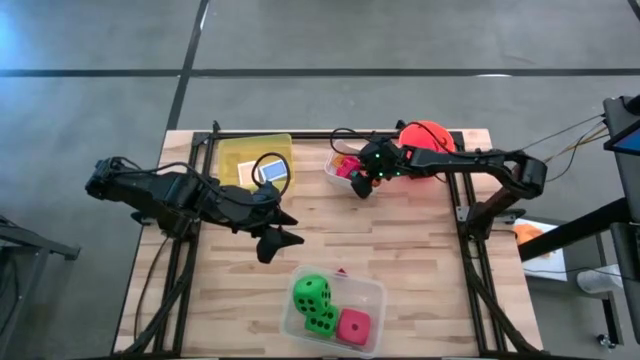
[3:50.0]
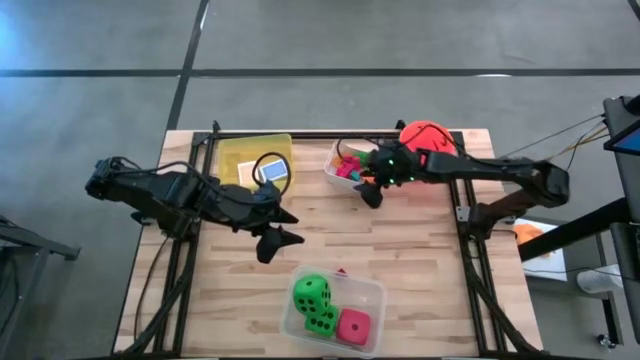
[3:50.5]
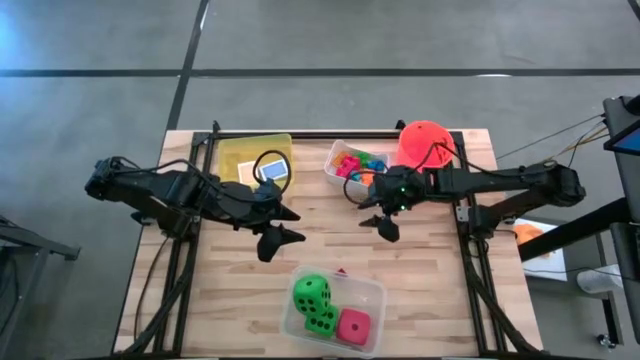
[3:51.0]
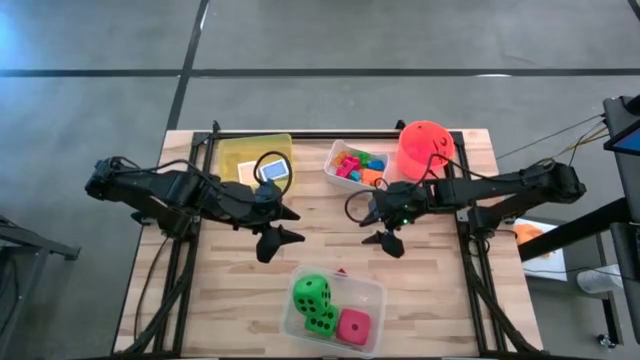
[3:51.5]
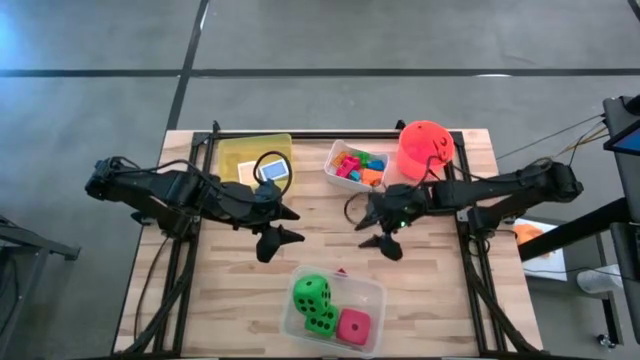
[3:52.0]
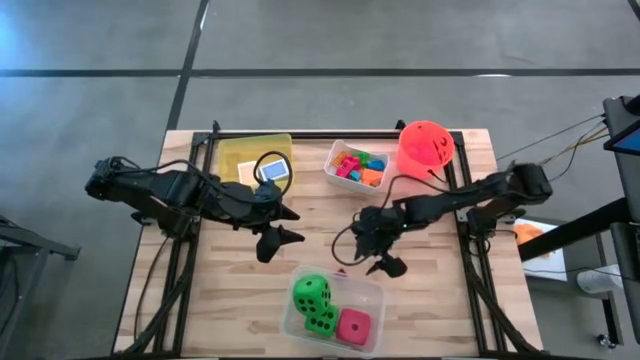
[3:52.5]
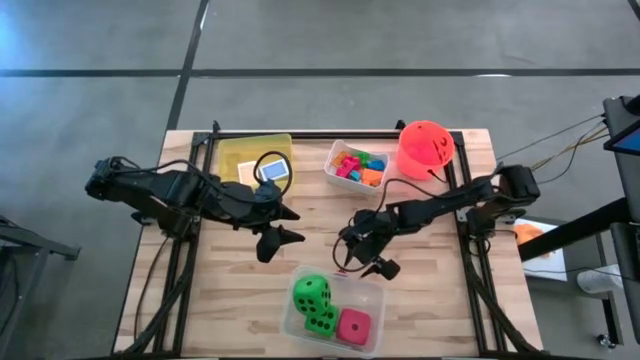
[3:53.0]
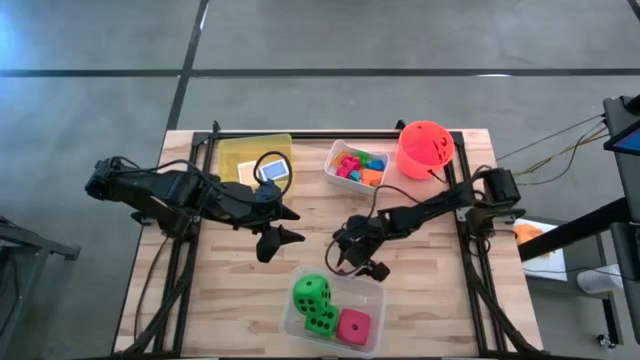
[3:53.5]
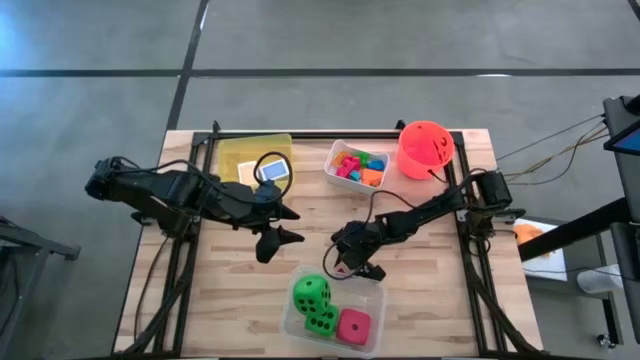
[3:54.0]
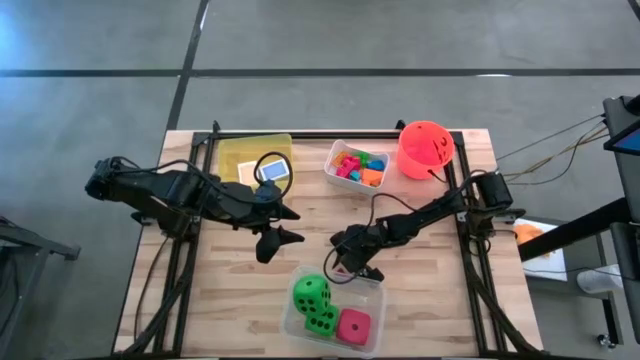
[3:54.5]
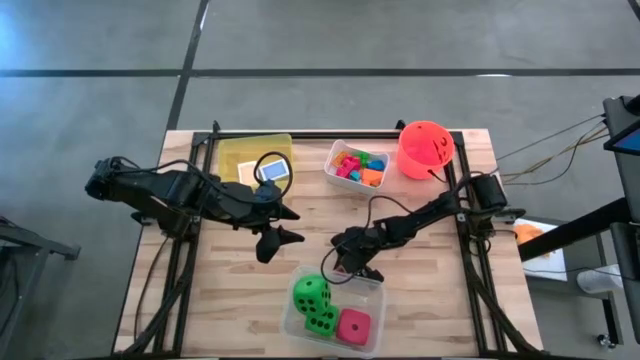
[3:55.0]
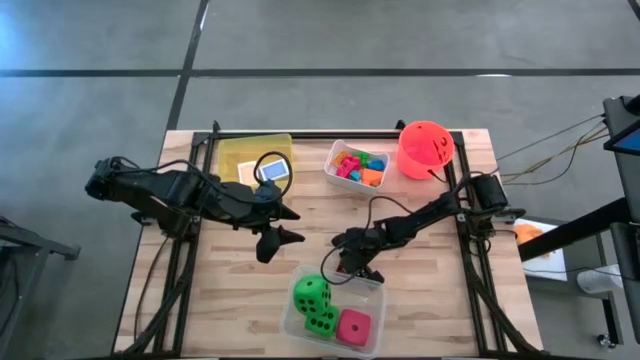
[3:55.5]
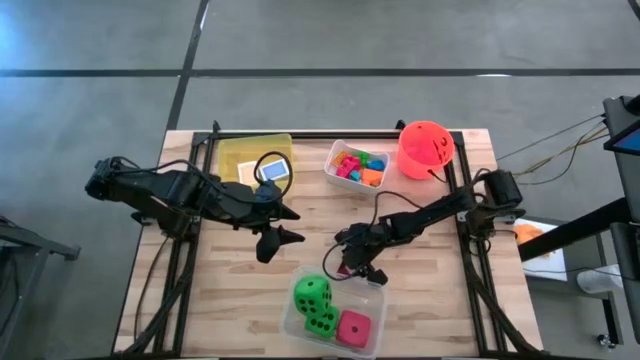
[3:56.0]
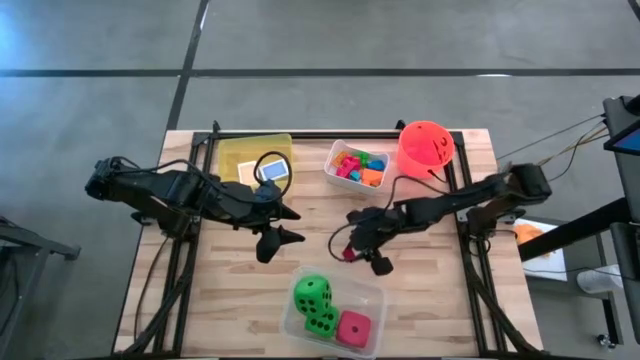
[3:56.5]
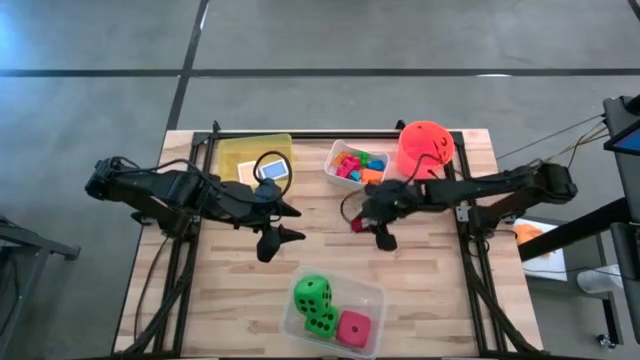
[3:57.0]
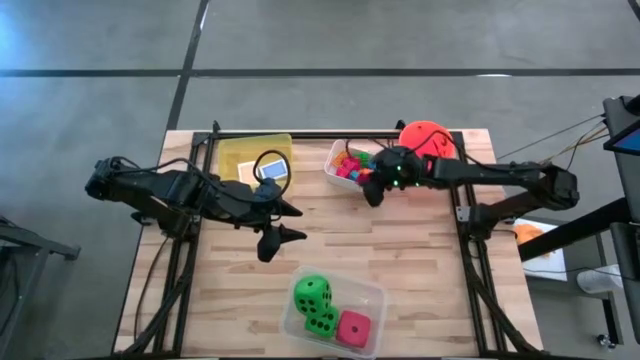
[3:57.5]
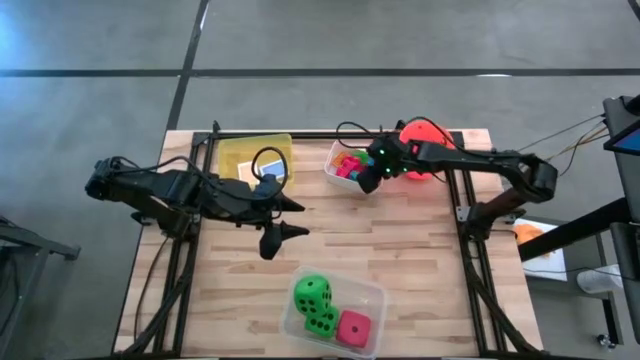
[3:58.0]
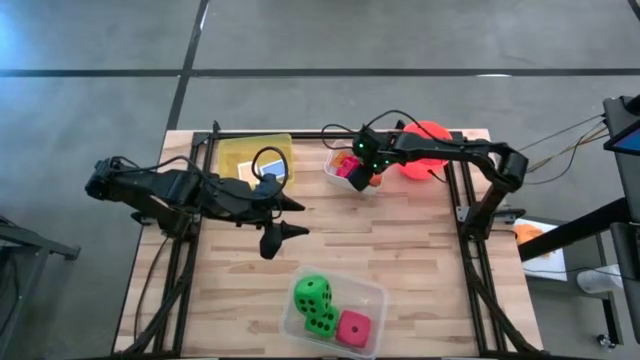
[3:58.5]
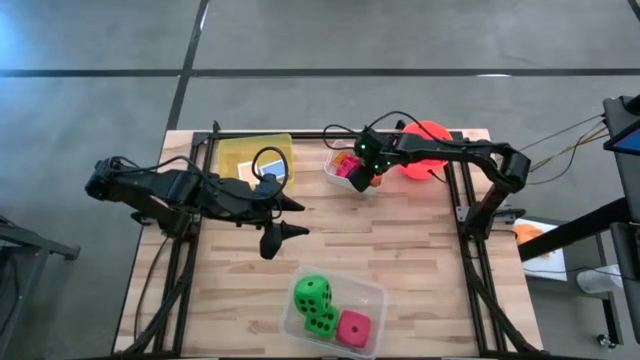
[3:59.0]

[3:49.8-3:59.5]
Task: Pick & Place Toys
Put the red game piece into the white bin

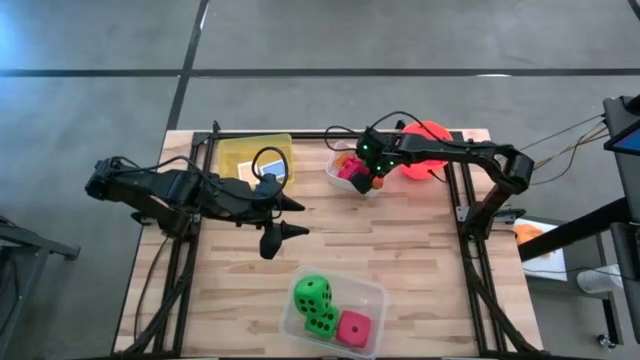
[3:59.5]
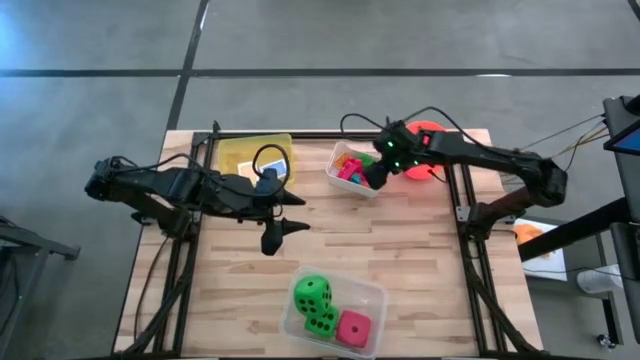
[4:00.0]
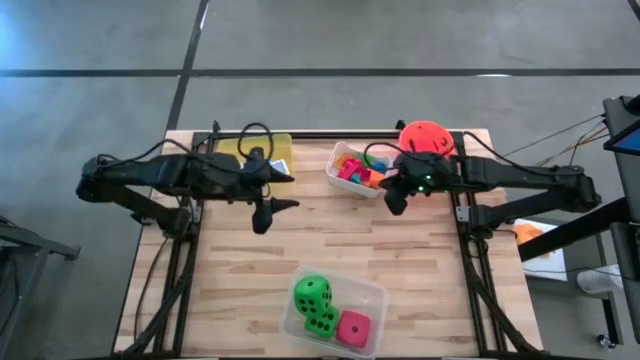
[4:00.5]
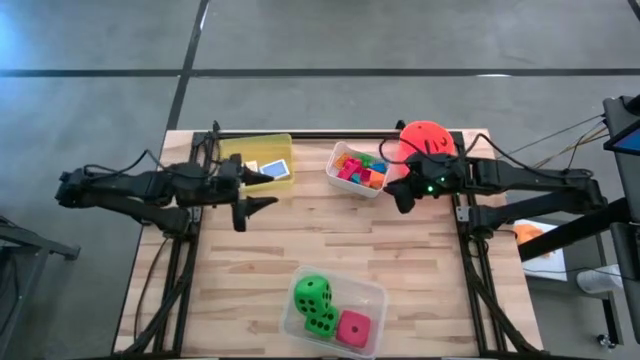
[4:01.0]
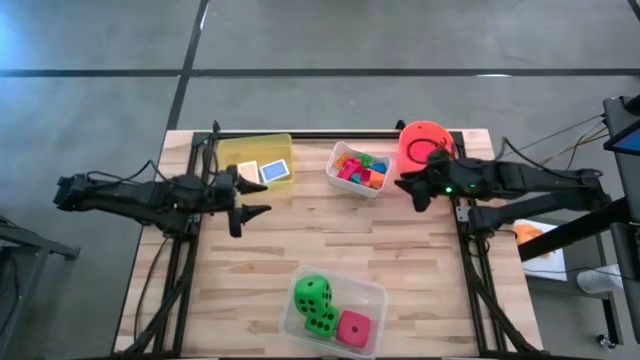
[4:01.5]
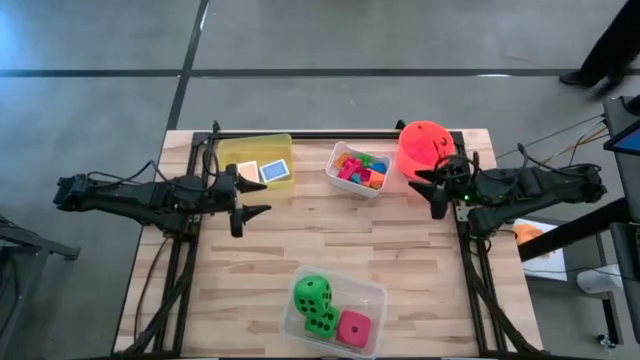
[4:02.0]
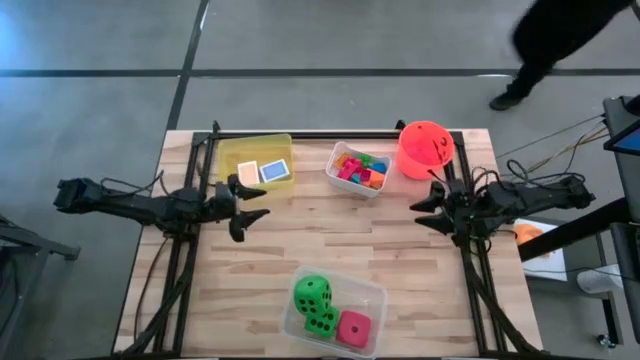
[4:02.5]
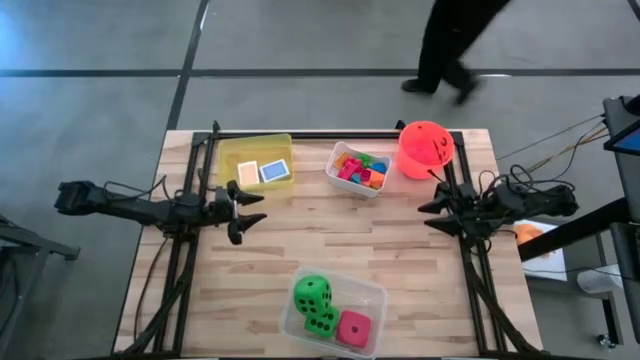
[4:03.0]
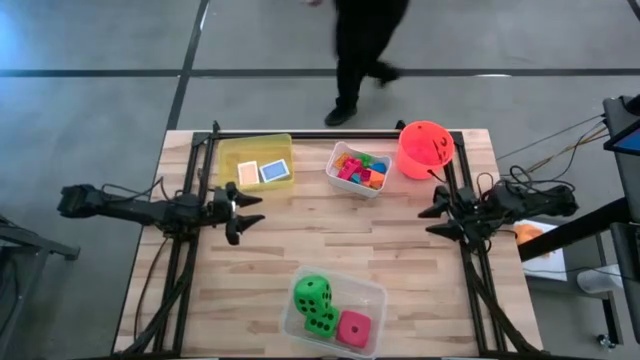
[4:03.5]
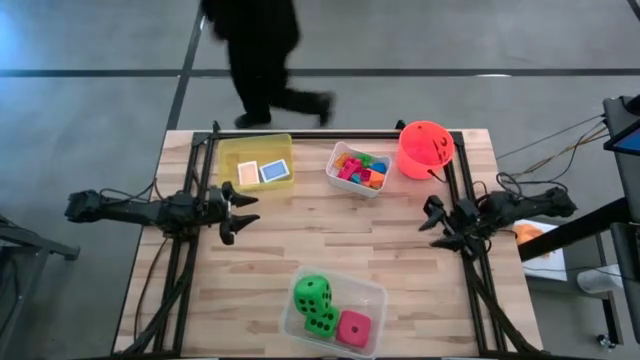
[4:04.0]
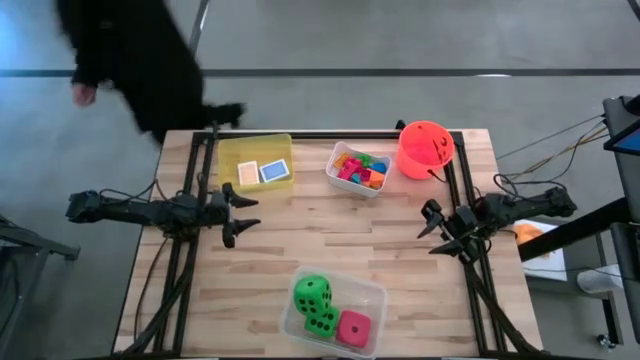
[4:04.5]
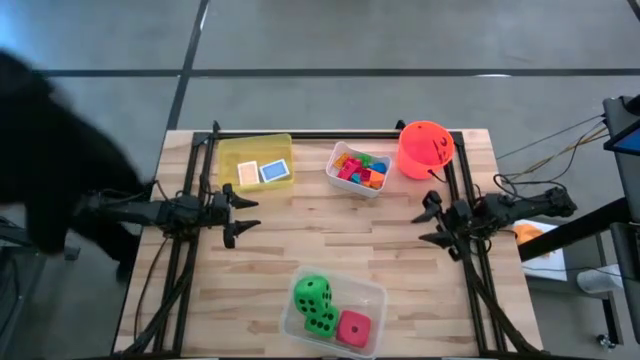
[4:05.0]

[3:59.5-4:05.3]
Return to Home Position

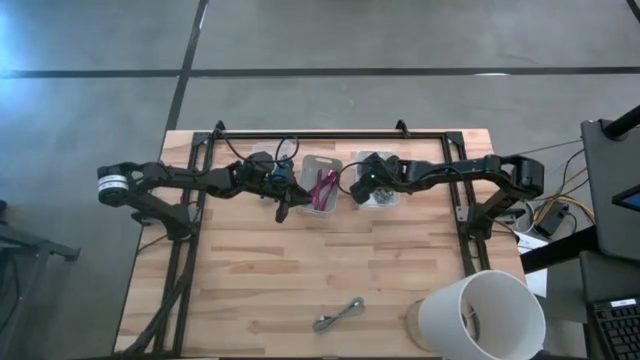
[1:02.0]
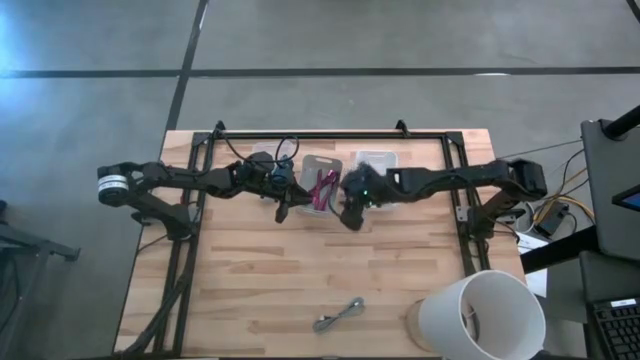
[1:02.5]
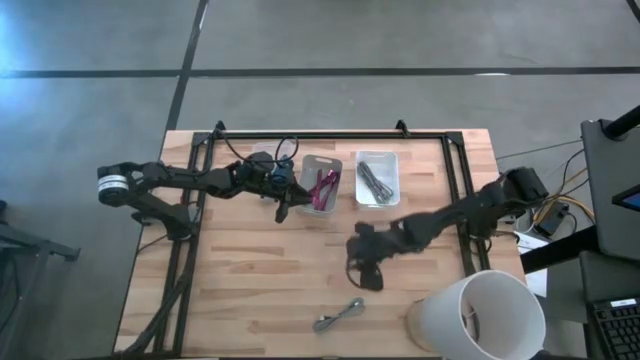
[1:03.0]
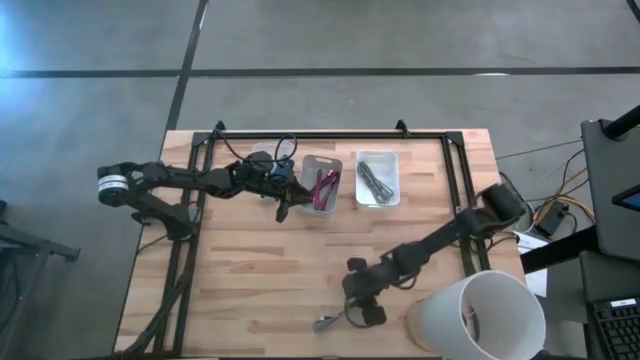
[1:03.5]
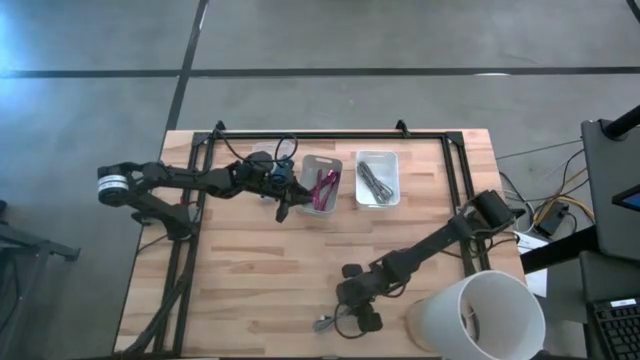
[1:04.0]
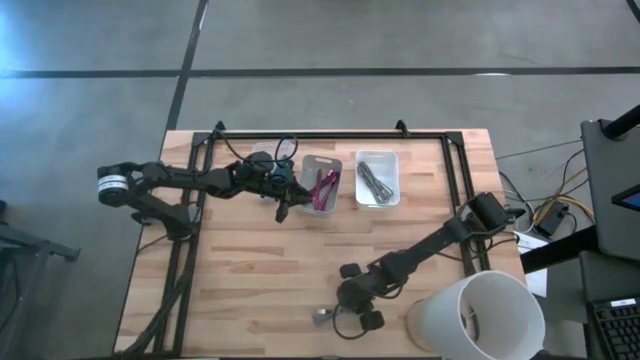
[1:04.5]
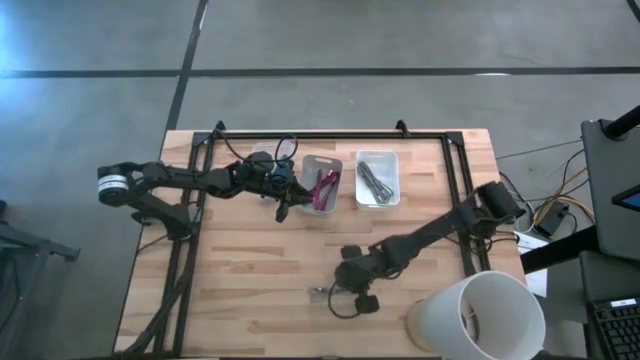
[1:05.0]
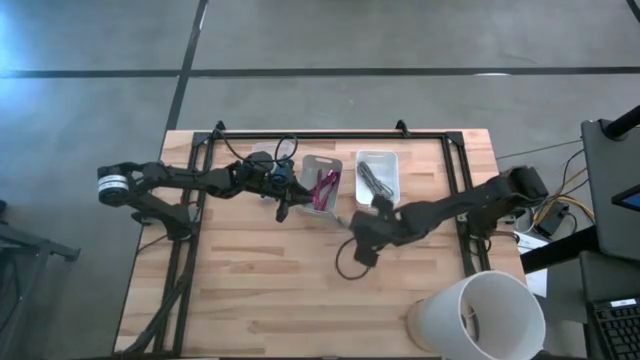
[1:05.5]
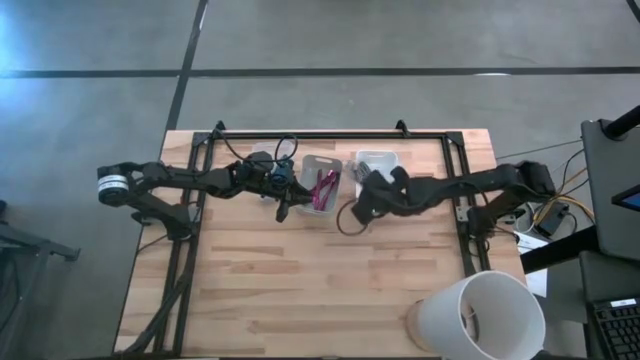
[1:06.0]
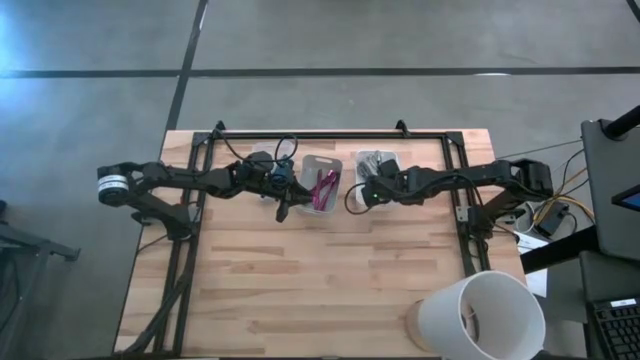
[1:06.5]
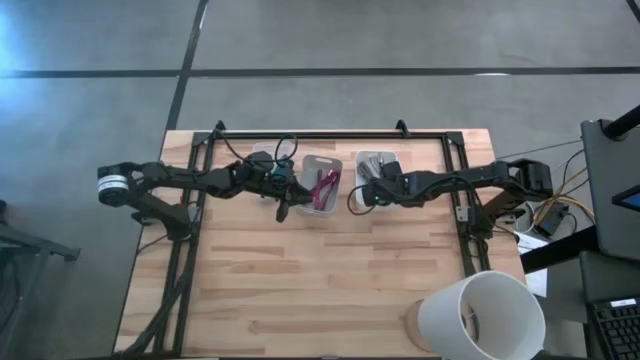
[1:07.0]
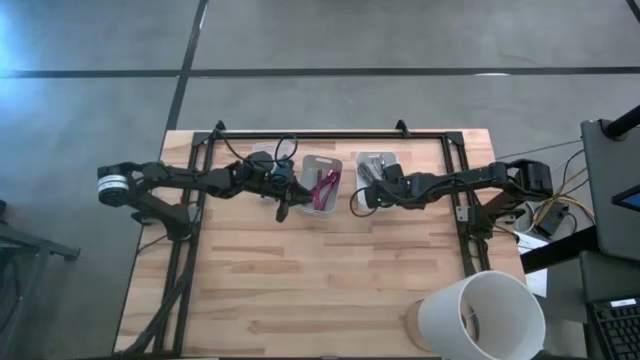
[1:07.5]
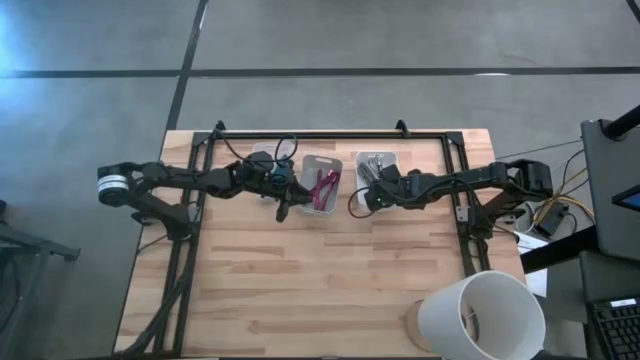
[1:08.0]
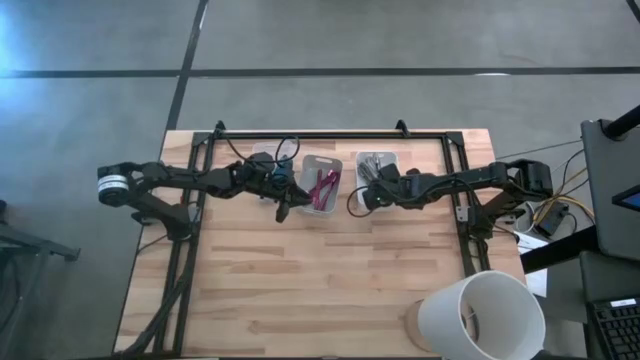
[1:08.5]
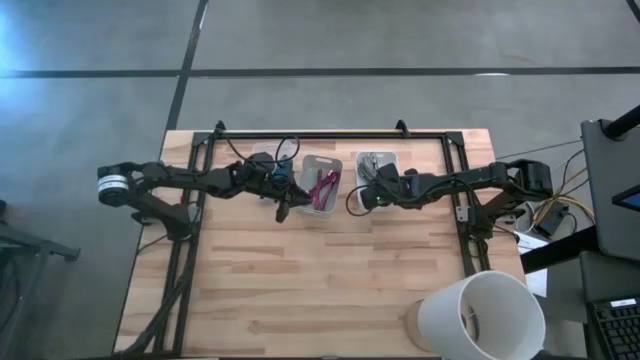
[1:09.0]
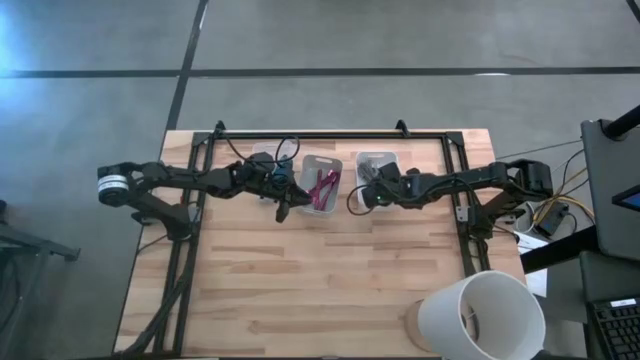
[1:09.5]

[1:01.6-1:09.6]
Task: Pick & Place USB Port
Put the white charger cable into the white bin
